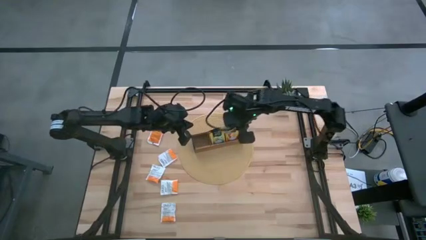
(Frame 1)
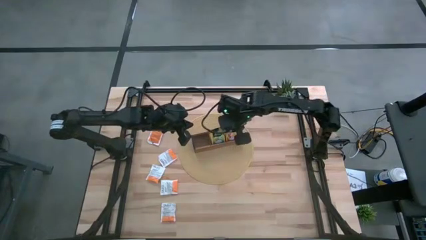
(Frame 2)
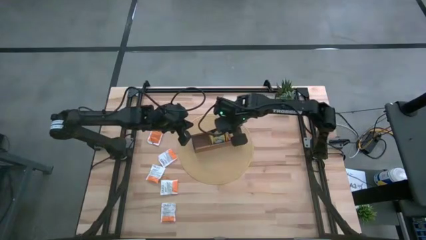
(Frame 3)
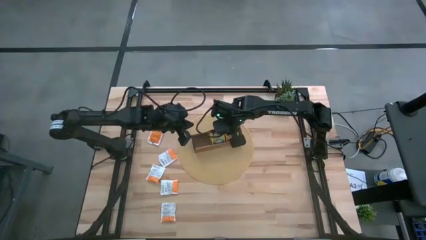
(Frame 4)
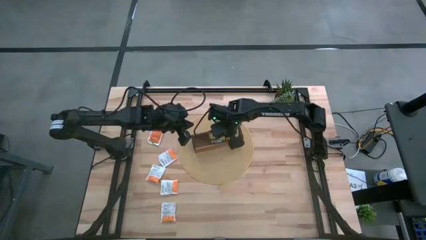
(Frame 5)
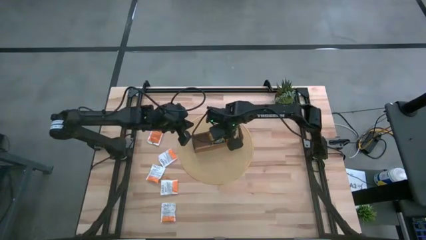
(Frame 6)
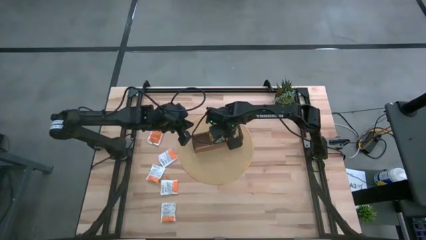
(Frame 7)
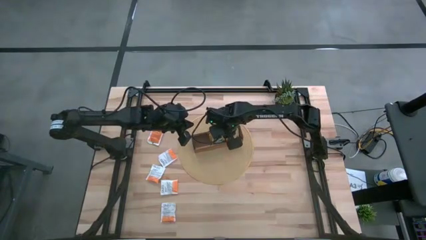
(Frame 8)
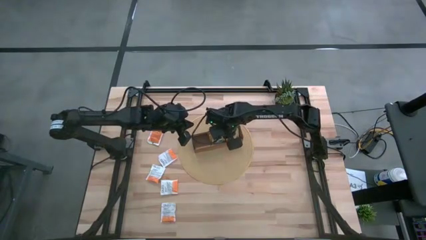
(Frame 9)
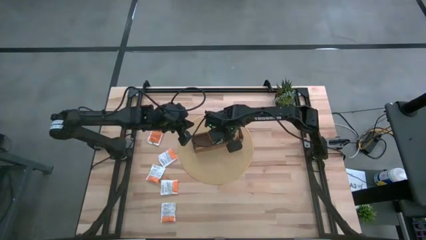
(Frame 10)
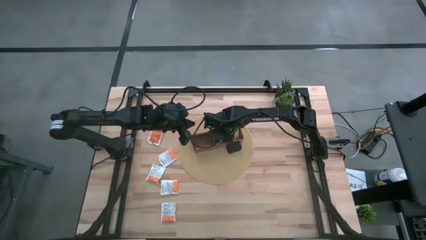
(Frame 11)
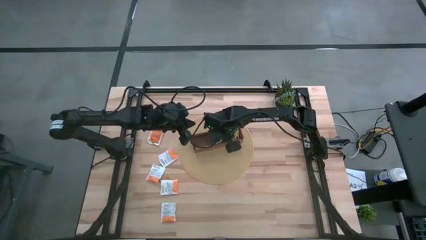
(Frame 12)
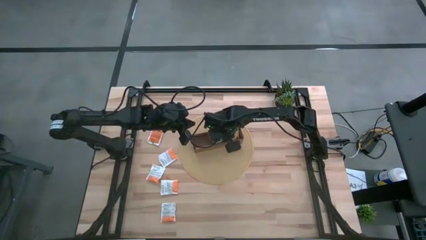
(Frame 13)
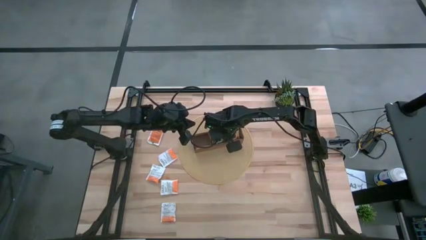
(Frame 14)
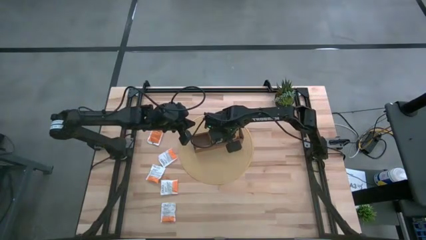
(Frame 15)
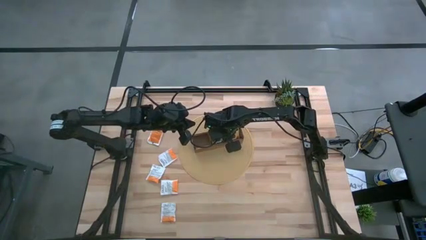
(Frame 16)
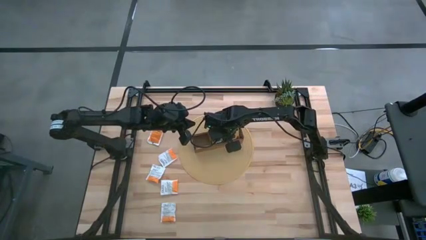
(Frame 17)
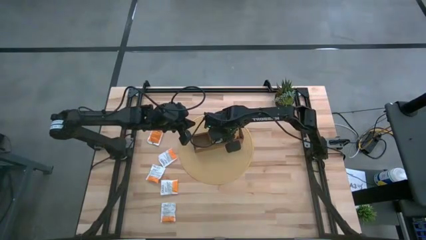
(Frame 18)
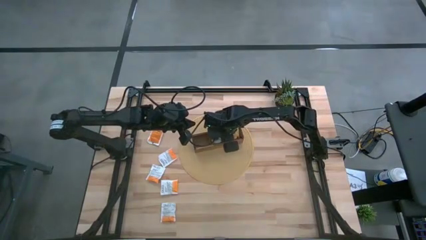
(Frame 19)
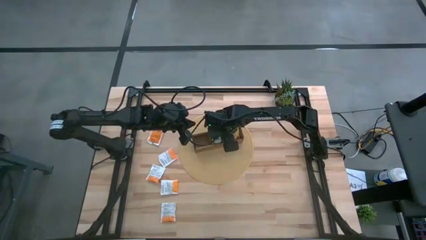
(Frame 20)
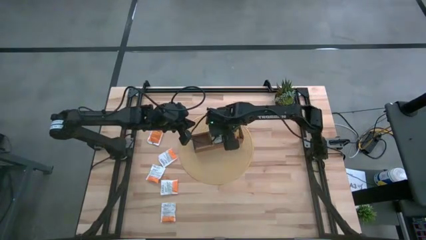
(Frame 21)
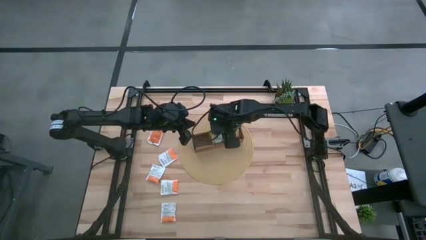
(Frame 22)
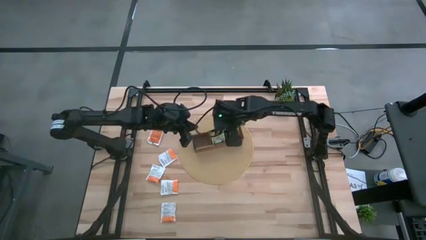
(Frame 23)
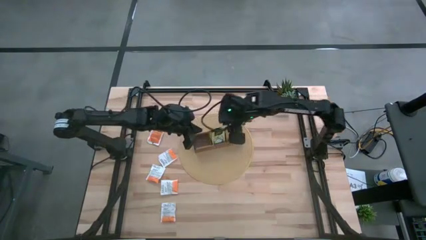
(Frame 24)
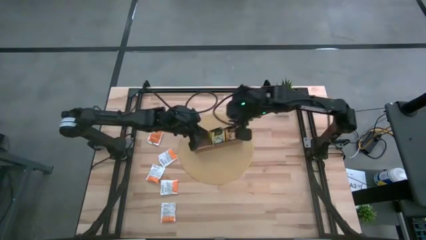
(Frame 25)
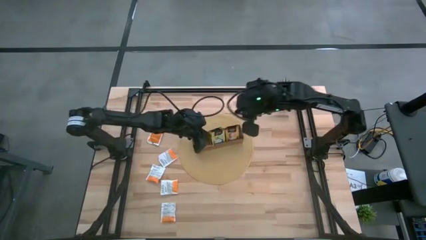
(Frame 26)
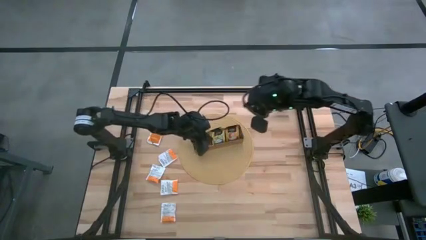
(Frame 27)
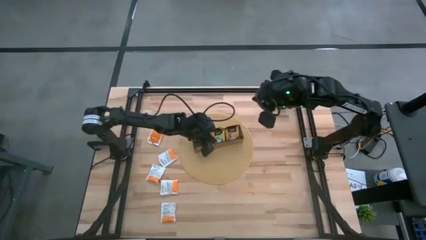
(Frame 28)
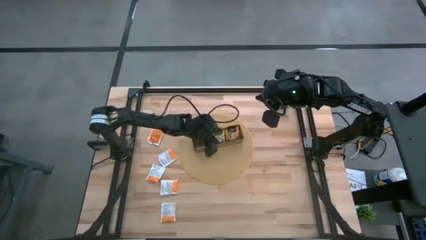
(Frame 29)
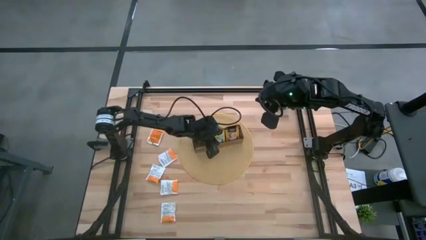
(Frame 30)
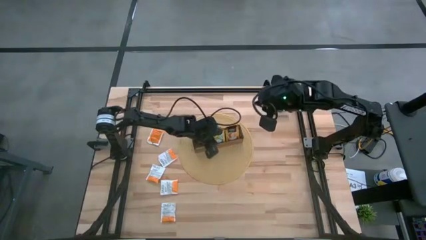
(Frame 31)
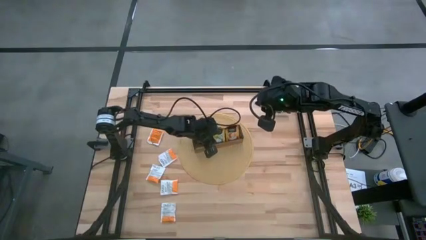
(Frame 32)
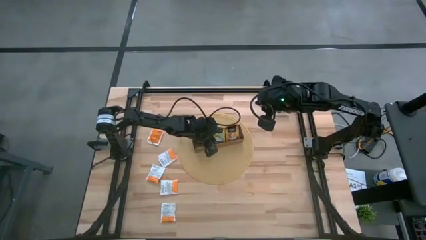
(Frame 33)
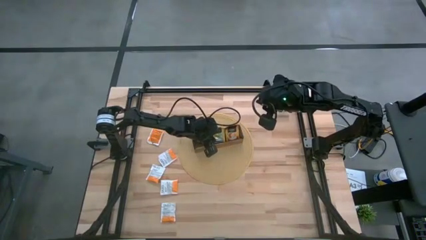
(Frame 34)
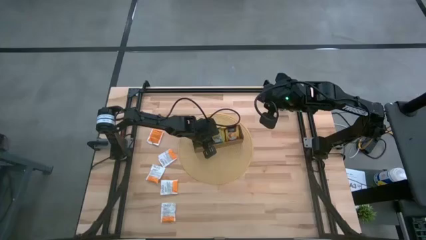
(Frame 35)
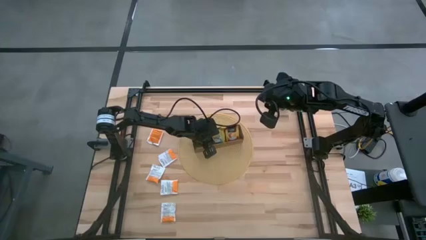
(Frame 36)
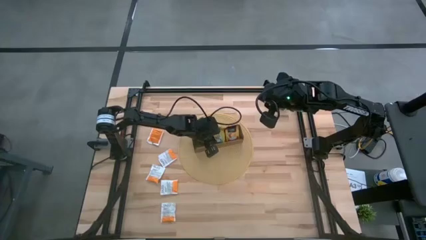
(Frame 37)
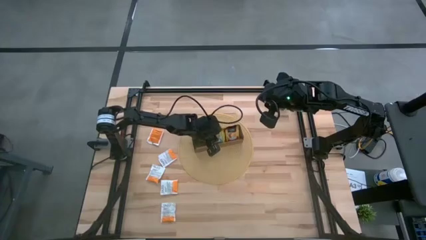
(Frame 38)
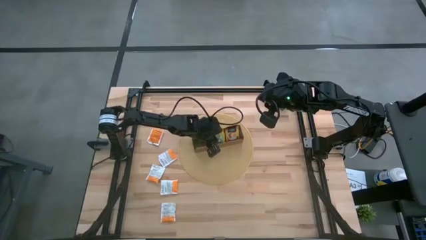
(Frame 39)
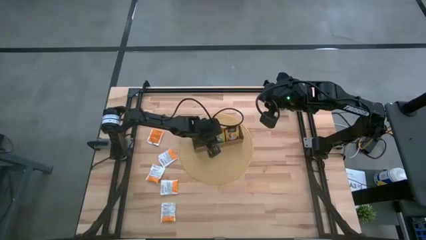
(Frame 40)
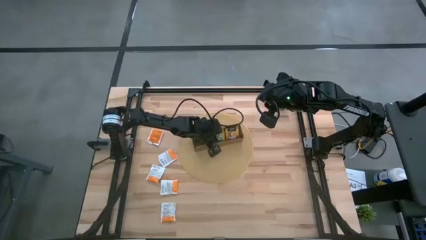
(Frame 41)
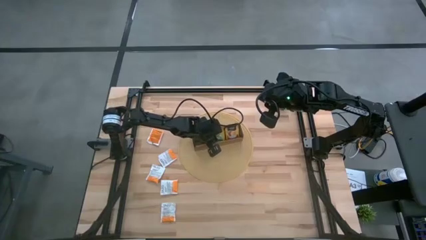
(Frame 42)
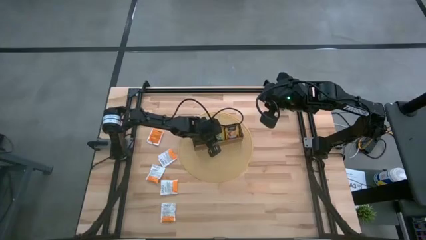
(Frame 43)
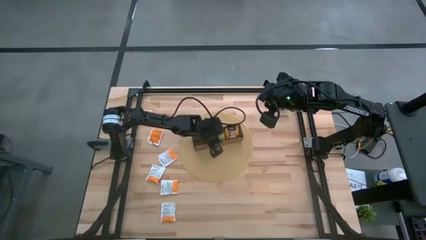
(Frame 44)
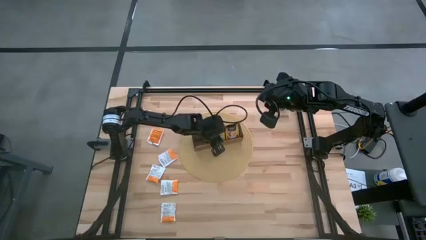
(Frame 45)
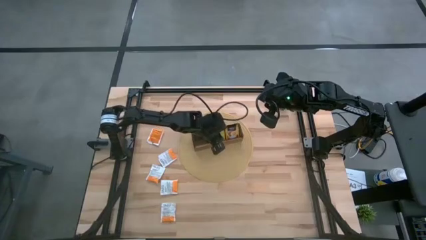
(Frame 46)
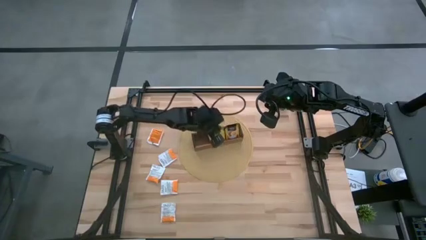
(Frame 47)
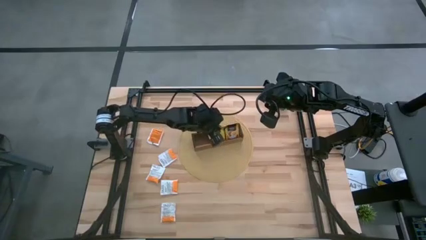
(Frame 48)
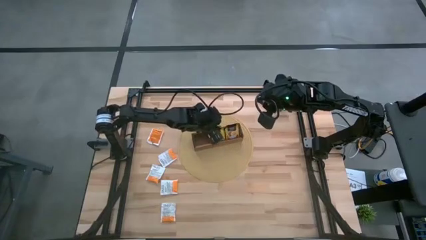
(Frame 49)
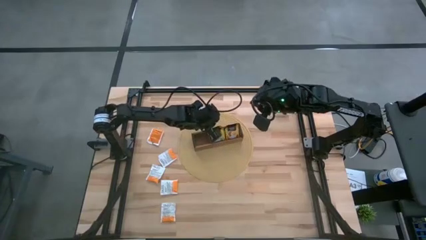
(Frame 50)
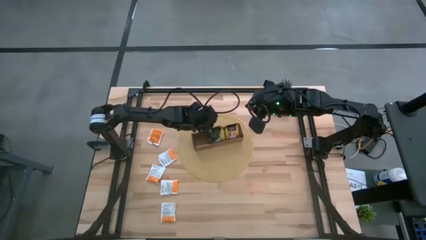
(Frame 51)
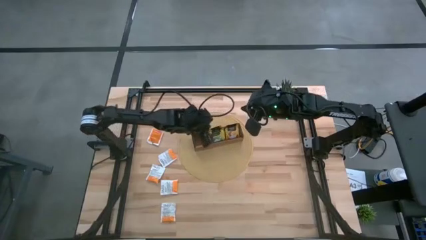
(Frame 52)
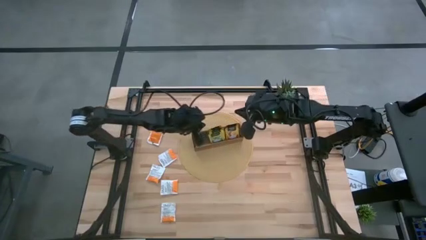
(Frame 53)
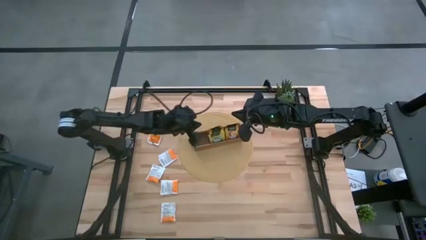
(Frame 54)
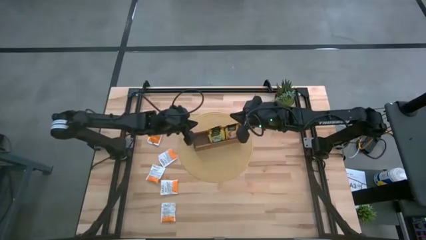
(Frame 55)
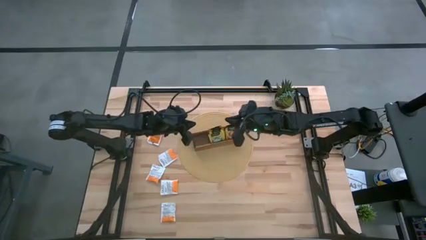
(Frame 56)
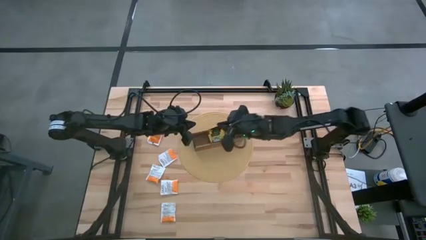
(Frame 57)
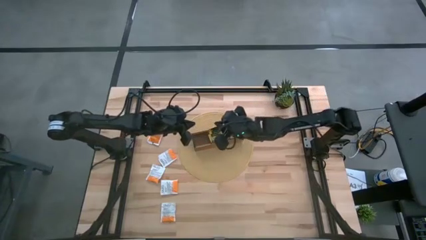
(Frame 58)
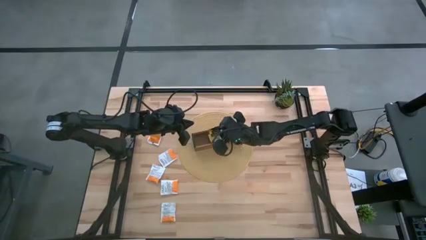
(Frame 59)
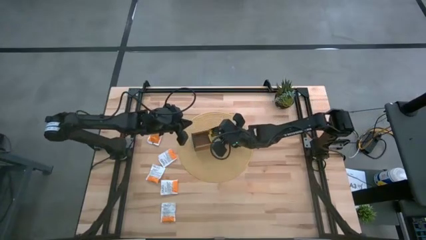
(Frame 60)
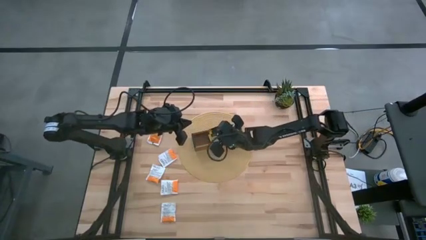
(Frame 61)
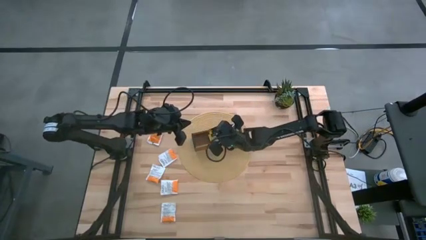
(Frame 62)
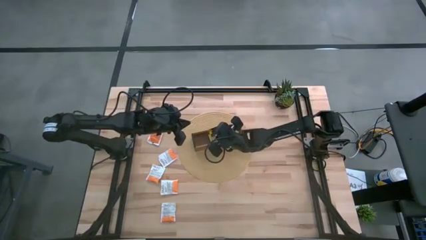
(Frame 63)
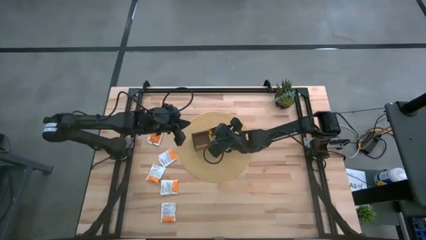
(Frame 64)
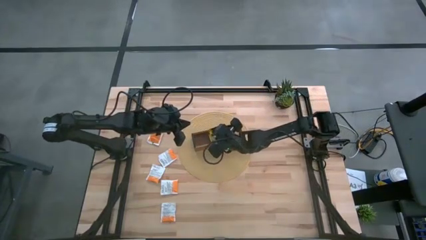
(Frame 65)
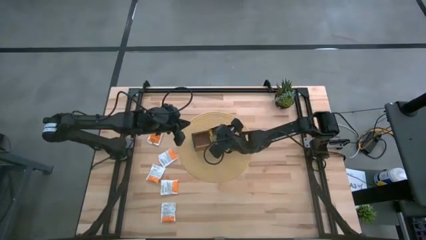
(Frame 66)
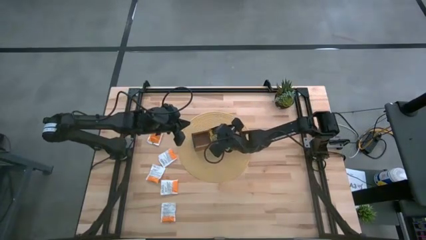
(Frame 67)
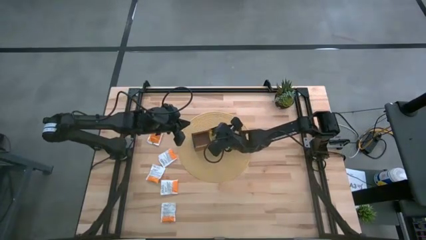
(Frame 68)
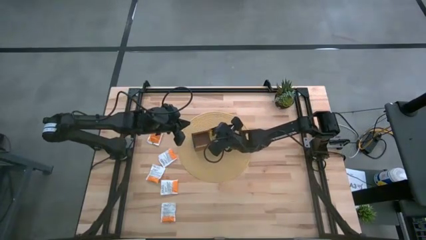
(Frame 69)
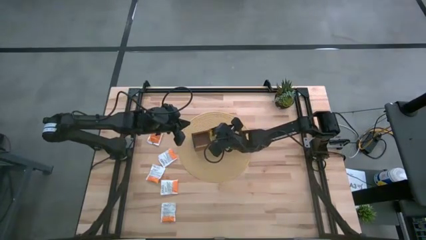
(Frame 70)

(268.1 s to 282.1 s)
Task: Pick & Place Tea
Put the yellow tea bag into the middle section of the wooden organizer

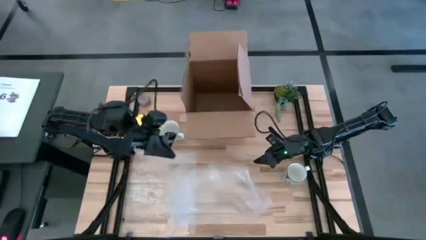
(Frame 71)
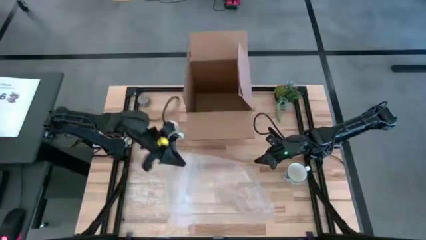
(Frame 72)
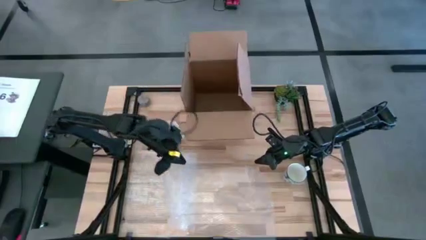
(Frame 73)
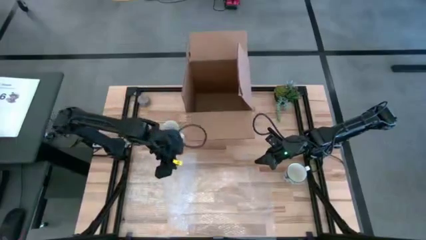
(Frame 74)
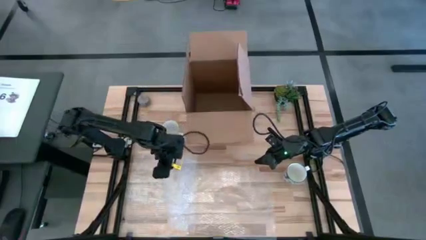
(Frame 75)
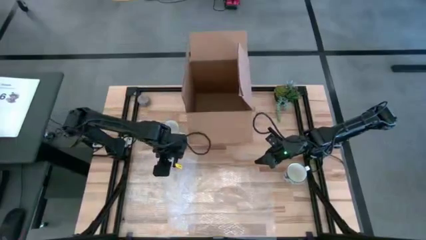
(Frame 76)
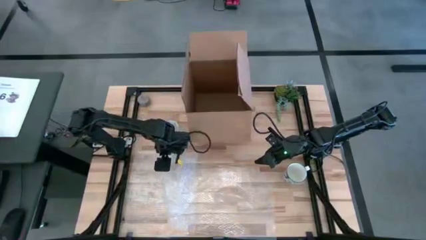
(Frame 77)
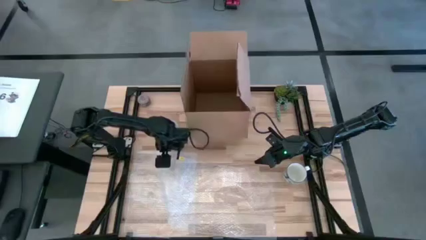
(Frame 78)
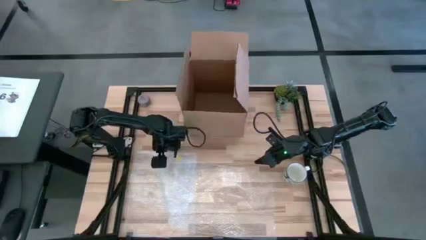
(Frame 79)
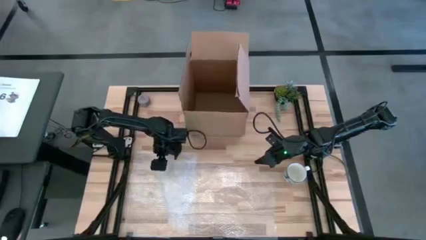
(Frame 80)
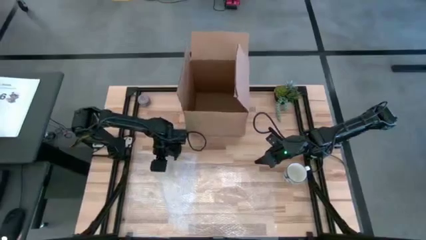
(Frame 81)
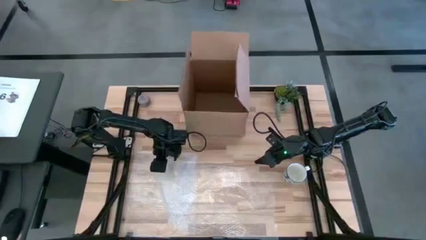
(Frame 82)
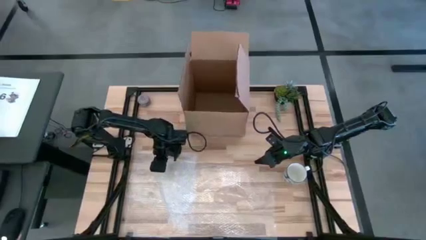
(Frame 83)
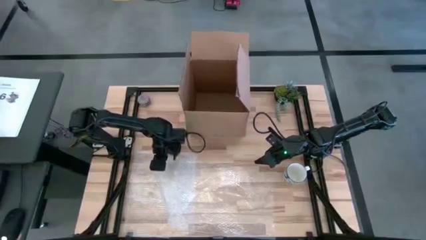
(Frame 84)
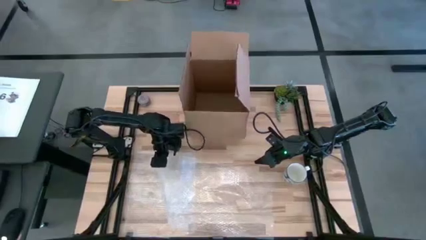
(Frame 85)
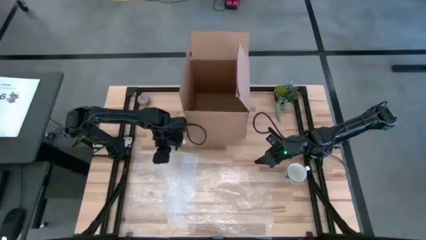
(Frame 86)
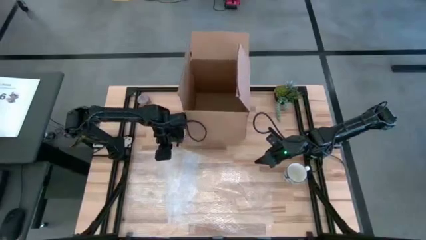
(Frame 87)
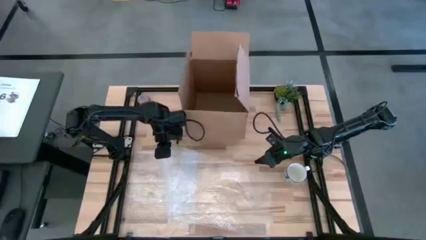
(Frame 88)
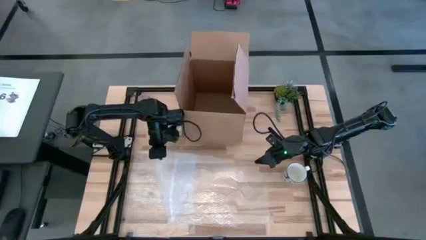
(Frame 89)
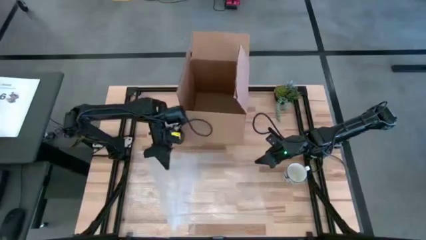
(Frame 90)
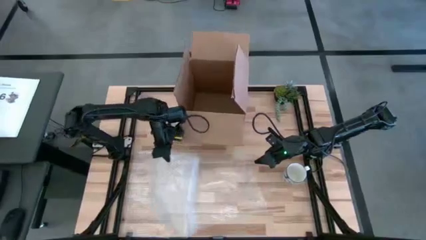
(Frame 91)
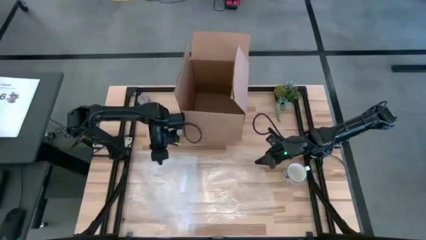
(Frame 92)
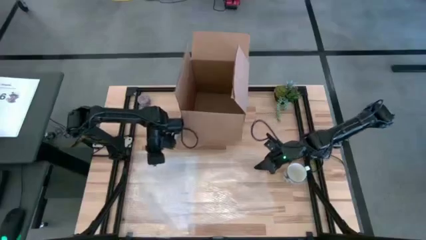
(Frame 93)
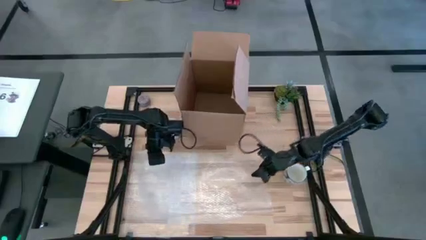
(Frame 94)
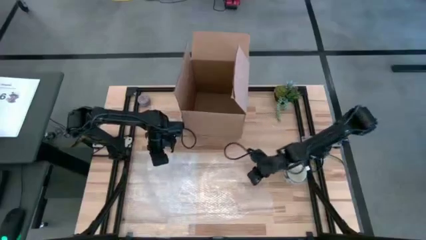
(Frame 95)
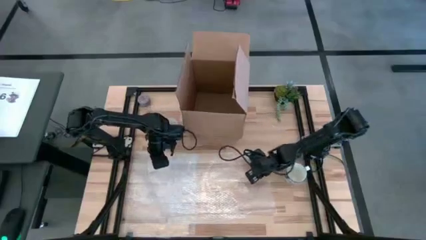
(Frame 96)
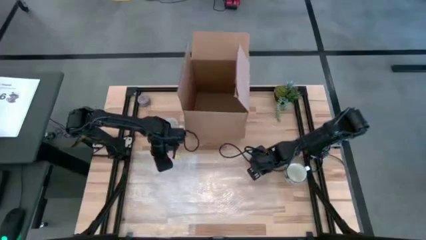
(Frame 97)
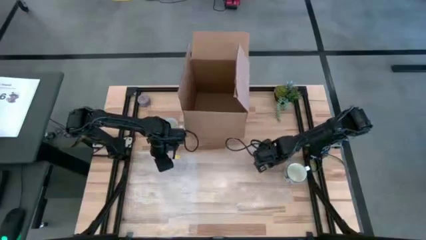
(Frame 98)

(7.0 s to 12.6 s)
Task: wrap mug
Prepare the right transparent bubble wrap
